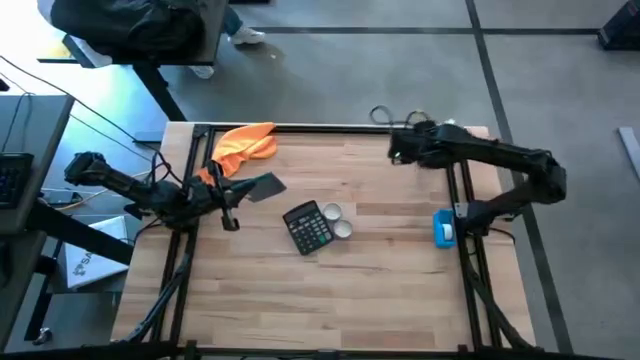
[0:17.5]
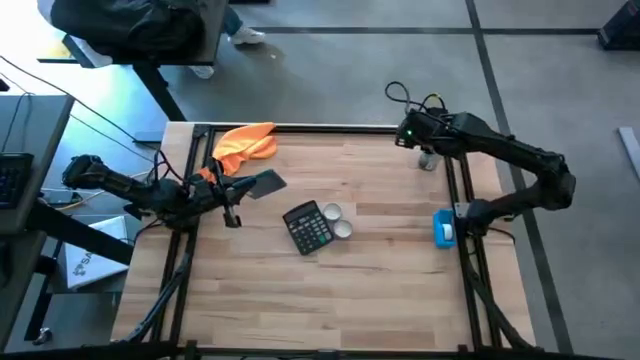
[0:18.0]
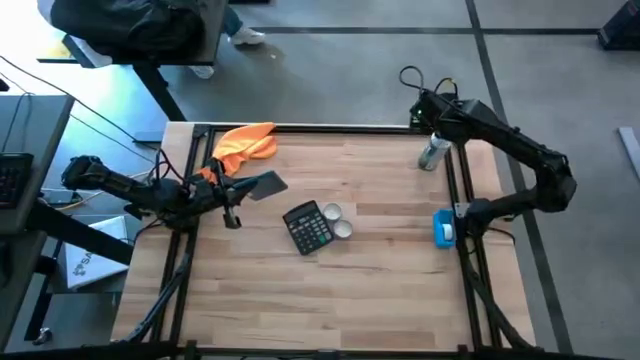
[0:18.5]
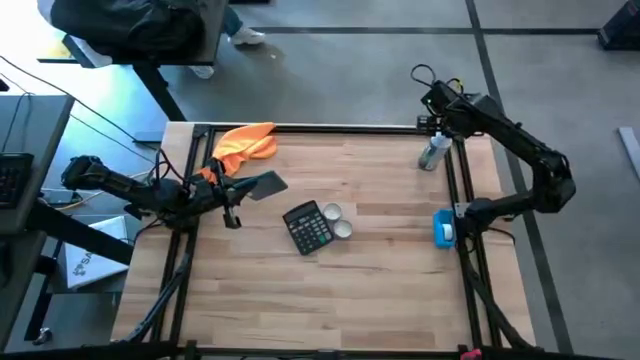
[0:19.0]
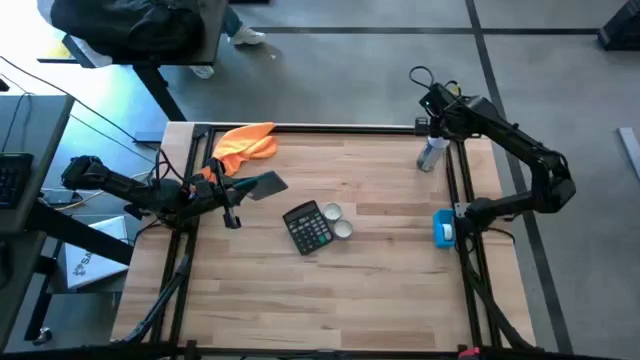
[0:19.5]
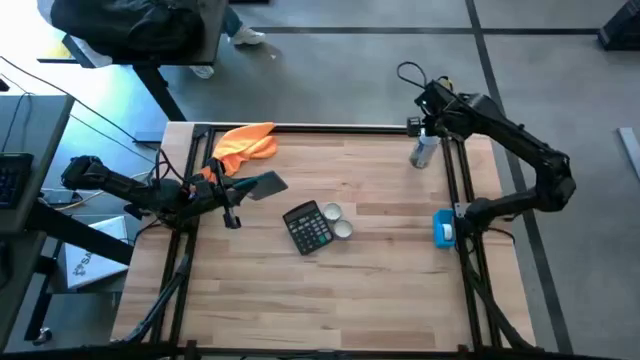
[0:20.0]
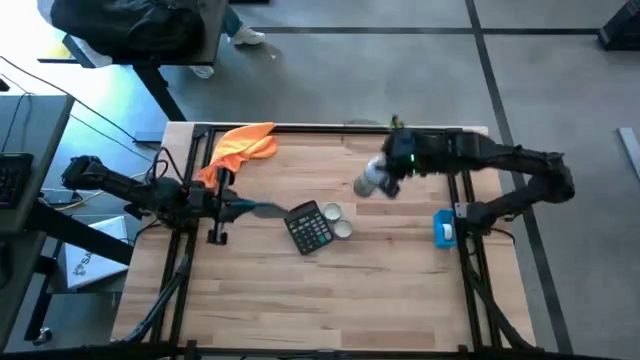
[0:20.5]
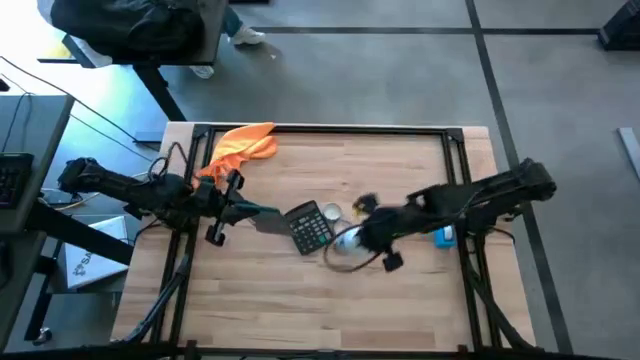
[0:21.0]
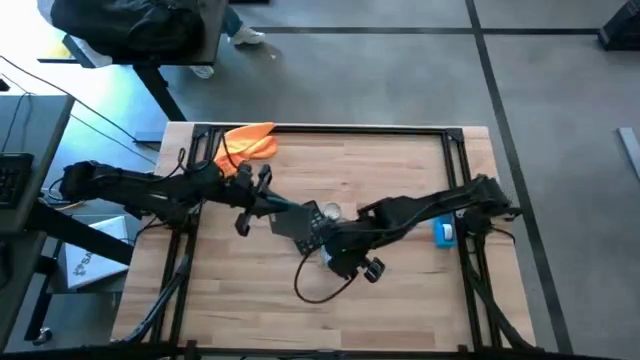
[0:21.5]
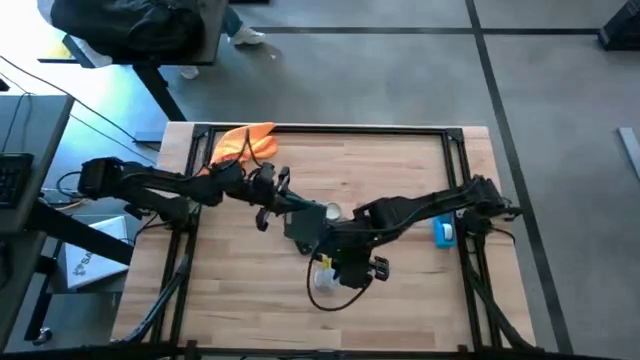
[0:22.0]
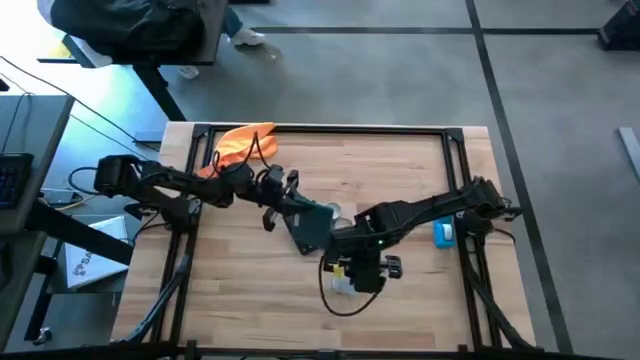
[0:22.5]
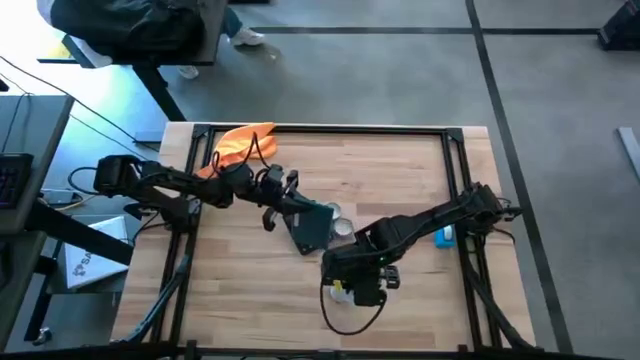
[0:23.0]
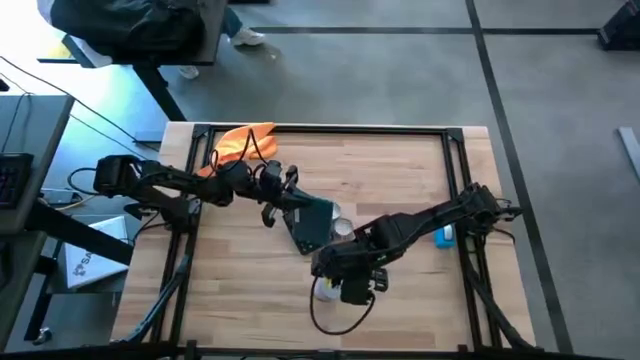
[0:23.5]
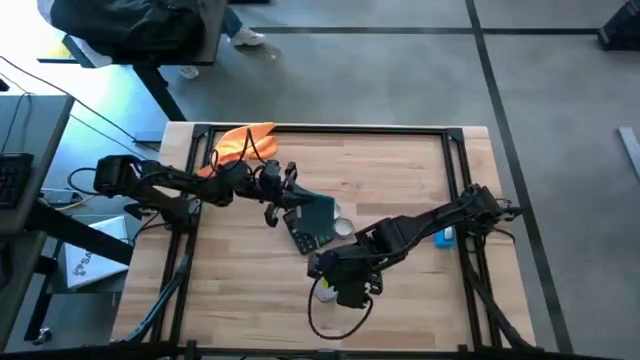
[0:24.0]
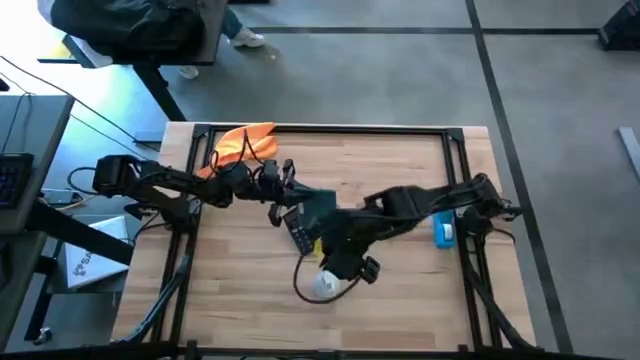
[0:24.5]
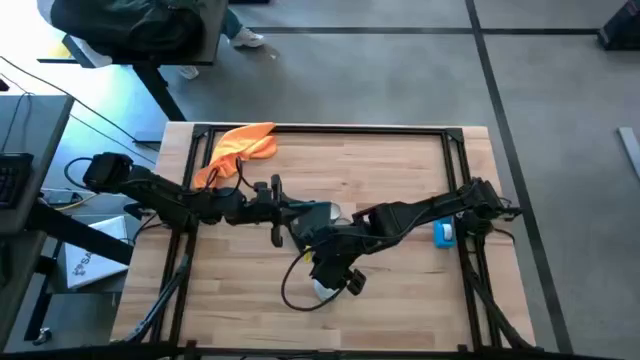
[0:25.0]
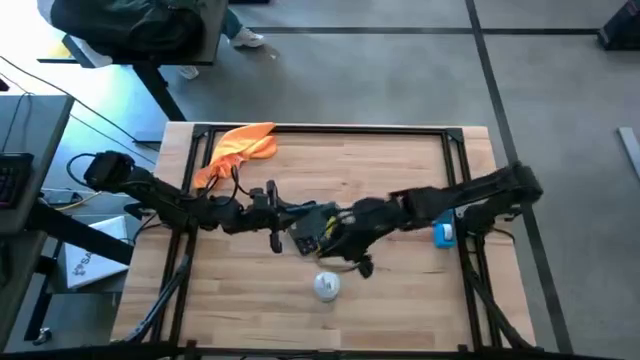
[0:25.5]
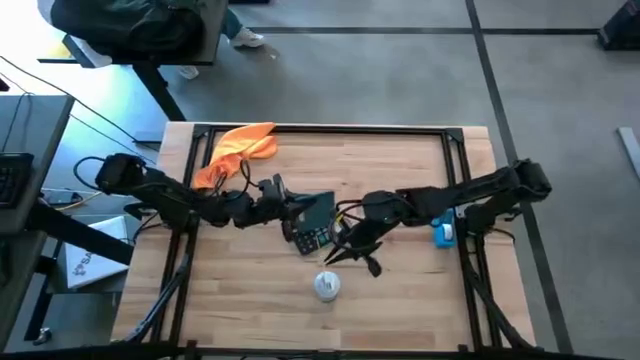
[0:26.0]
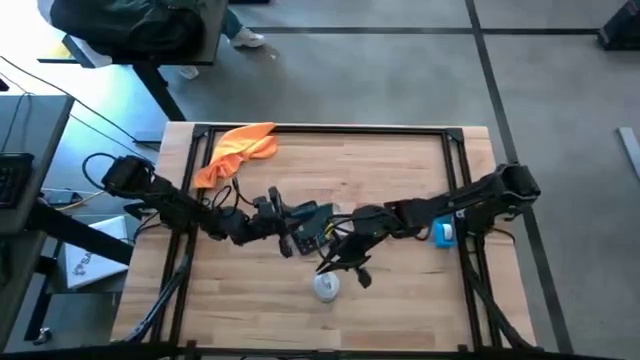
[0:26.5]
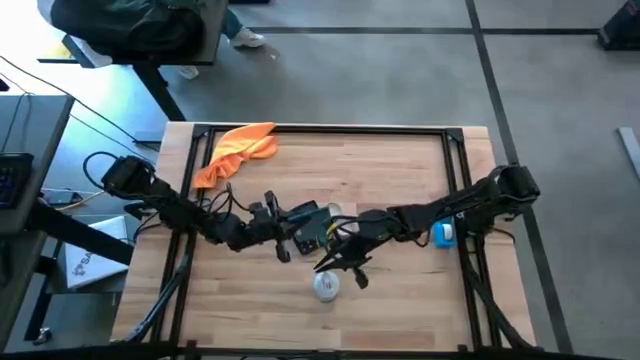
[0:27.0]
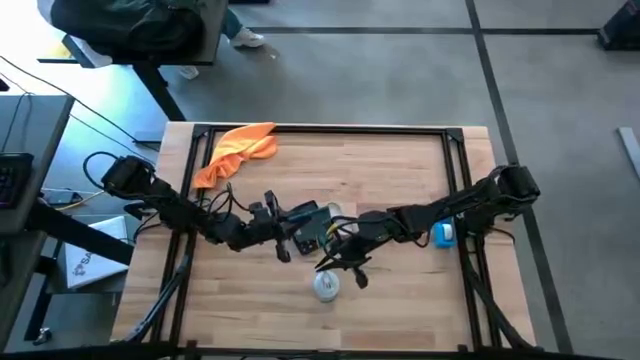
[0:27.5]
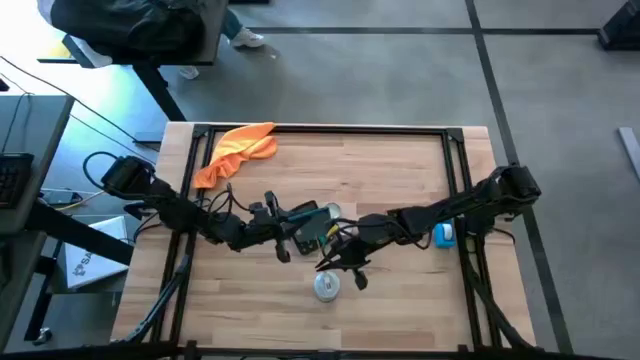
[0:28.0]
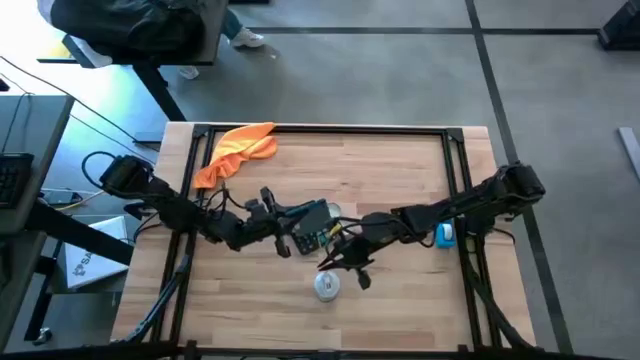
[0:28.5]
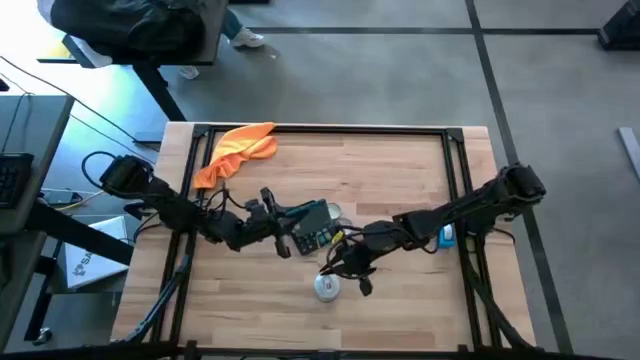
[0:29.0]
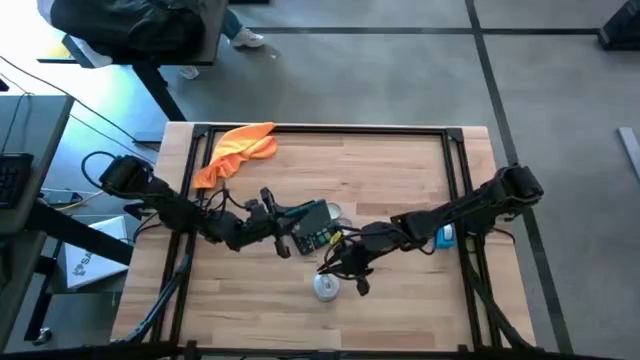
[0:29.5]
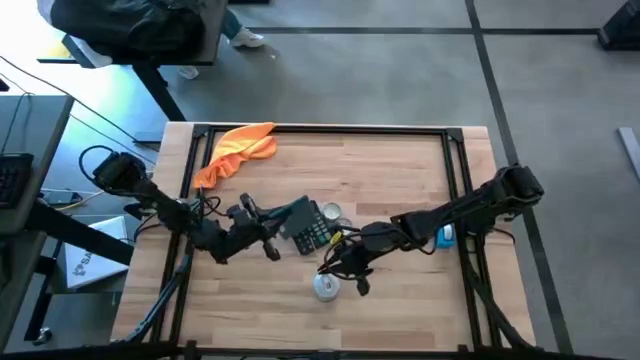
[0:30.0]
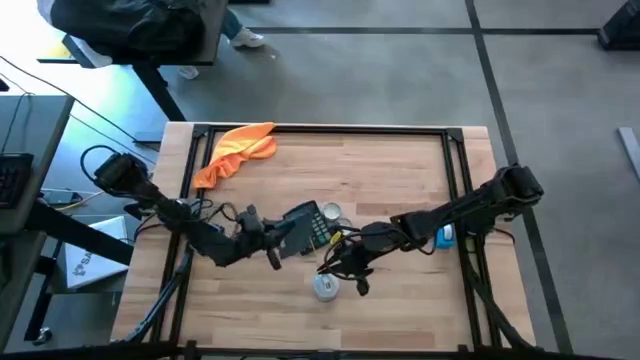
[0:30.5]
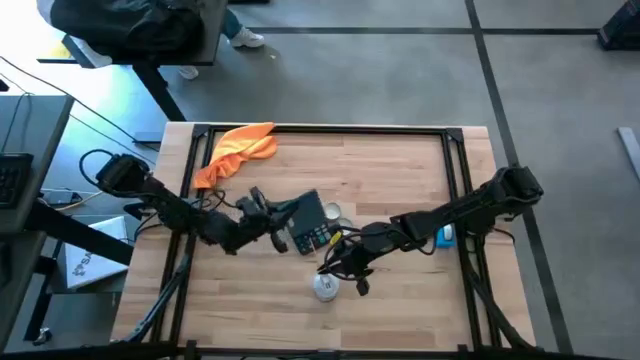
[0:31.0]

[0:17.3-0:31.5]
Task: Apply microfiber cloth
Spray the back of the black tablet using the white spray bottle

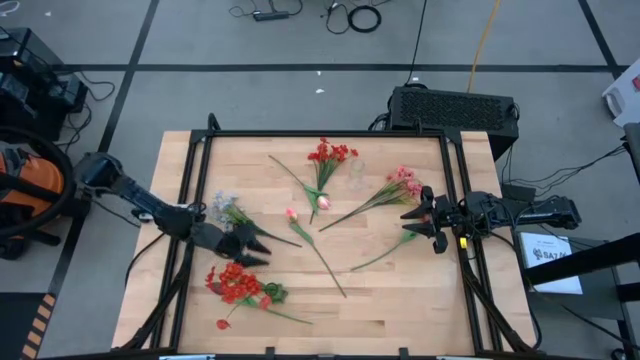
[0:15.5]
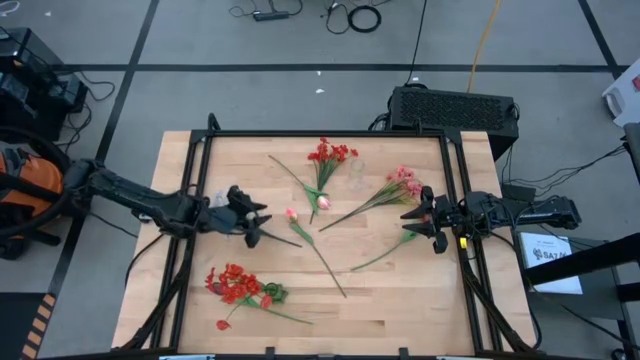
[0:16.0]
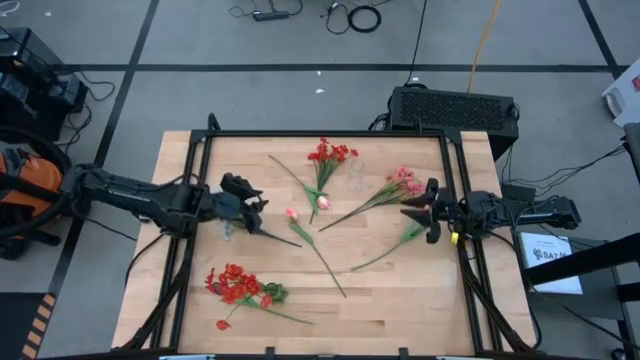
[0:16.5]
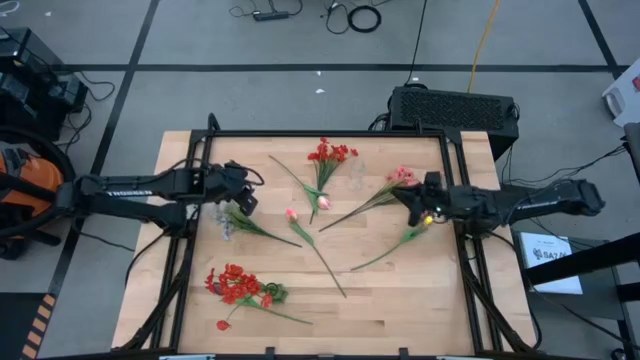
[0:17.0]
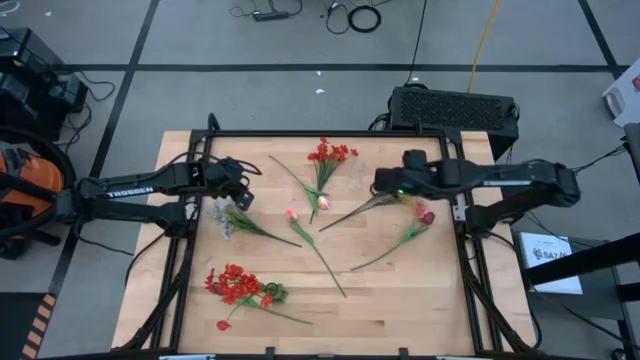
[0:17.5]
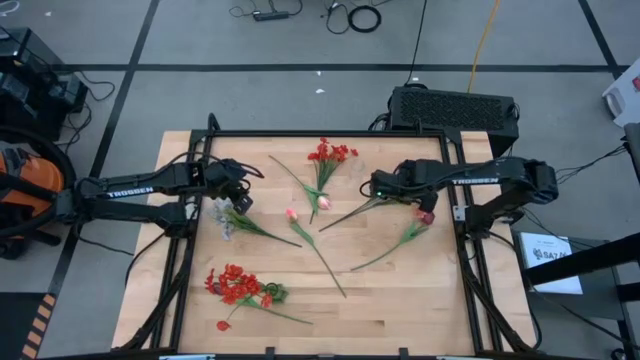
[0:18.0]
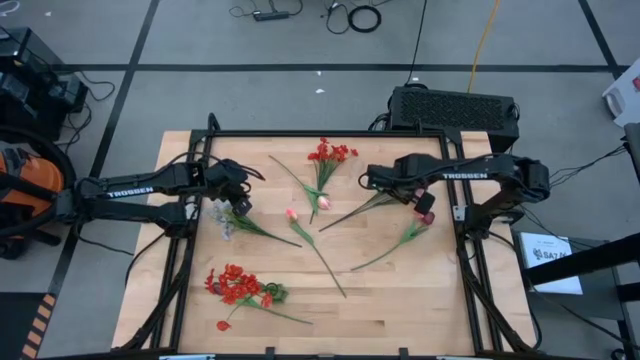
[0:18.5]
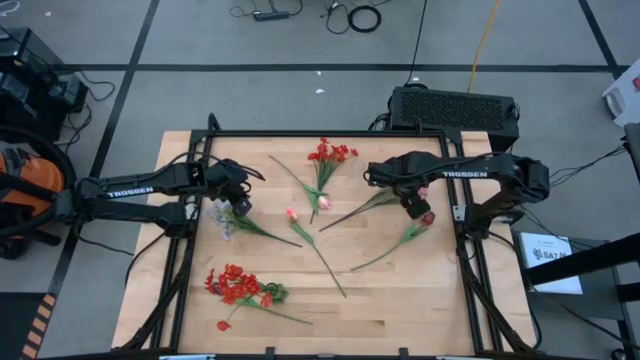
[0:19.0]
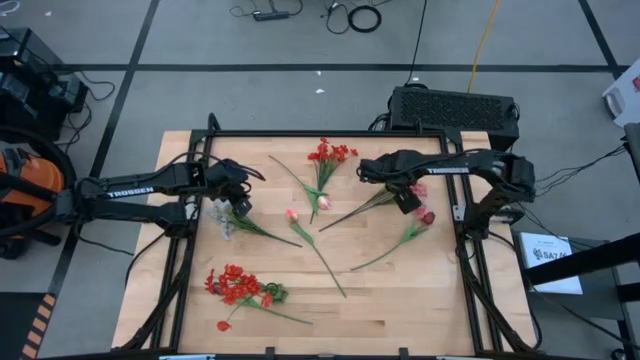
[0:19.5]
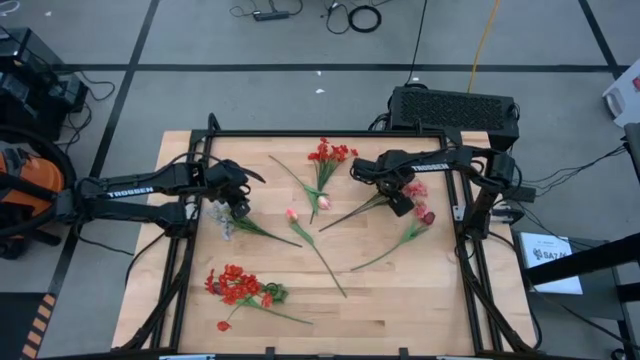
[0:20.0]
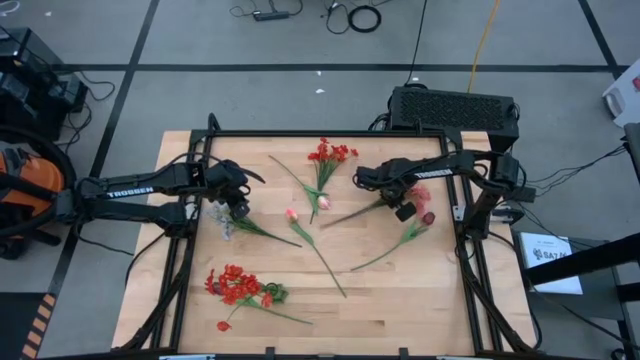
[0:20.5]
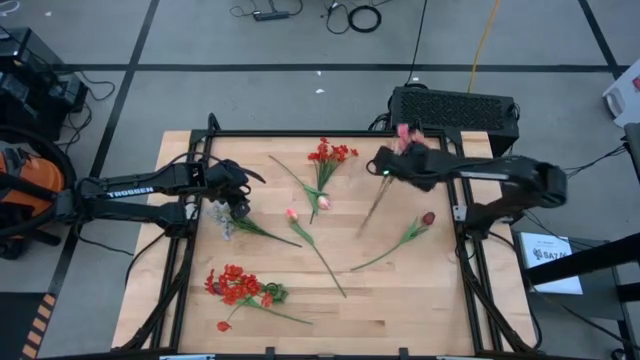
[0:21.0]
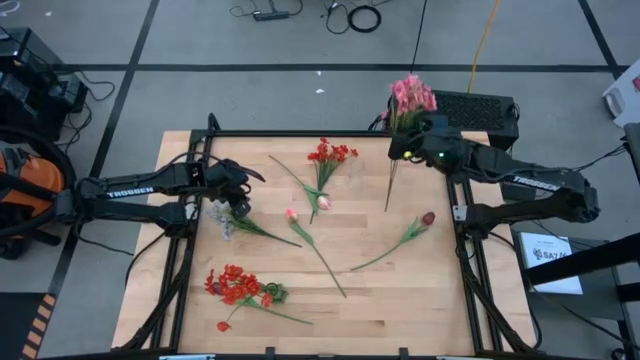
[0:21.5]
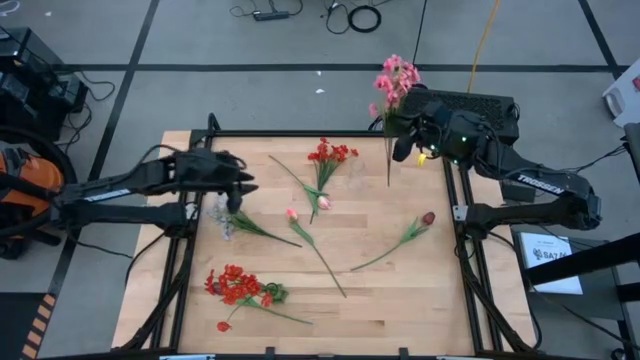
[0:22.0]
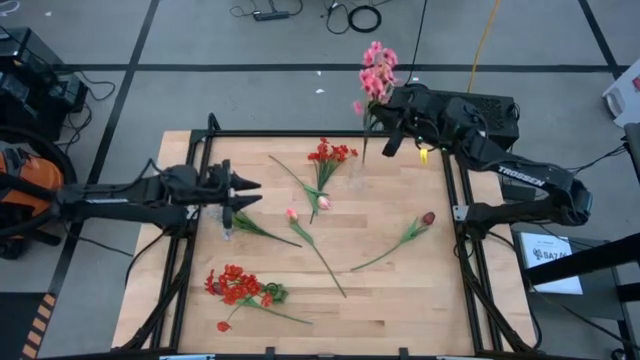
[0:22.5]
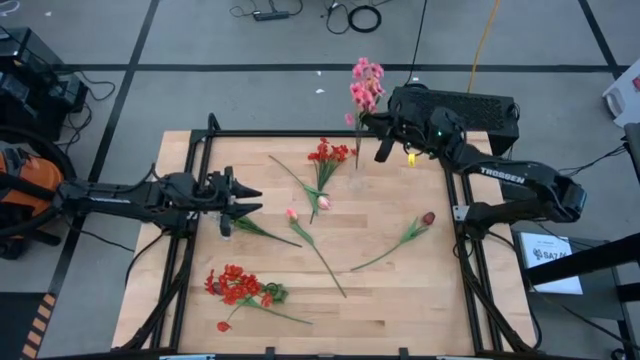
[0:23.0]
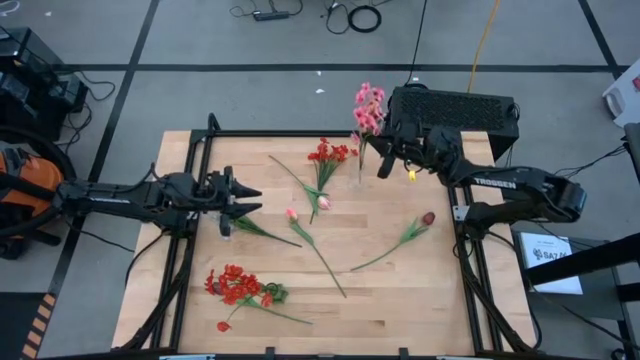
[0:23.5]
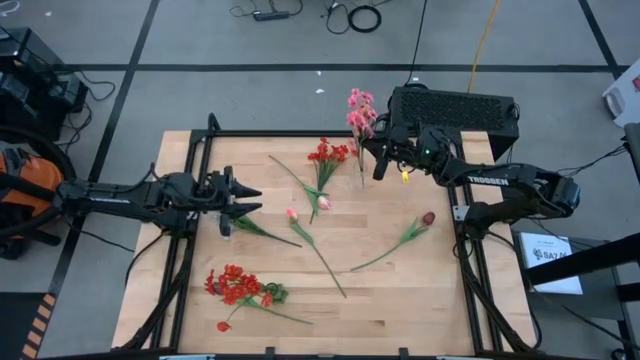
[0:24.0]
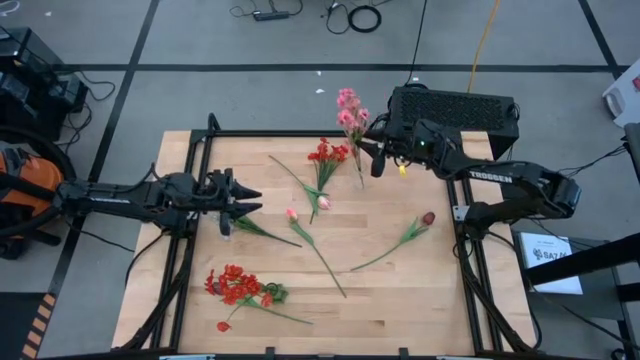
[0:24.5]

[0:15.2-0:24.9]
Task: Sort flowers into vase by color
Put the pink flowers into the transparent vase
